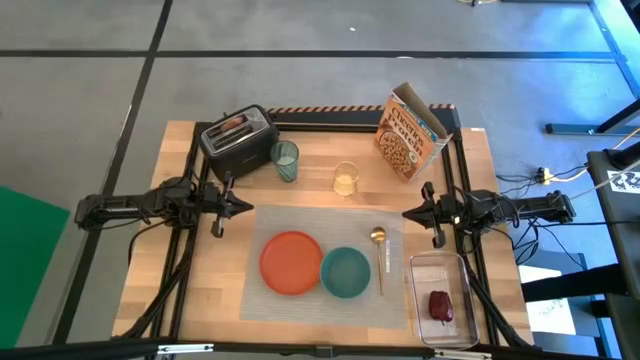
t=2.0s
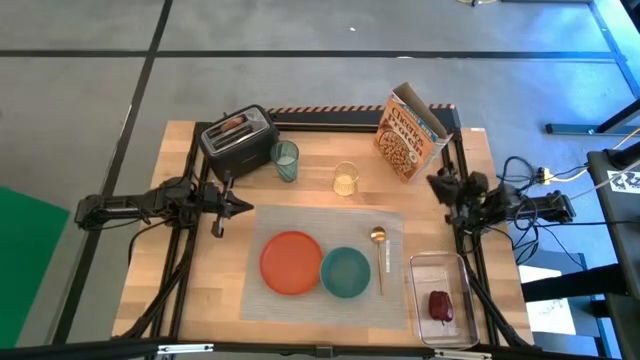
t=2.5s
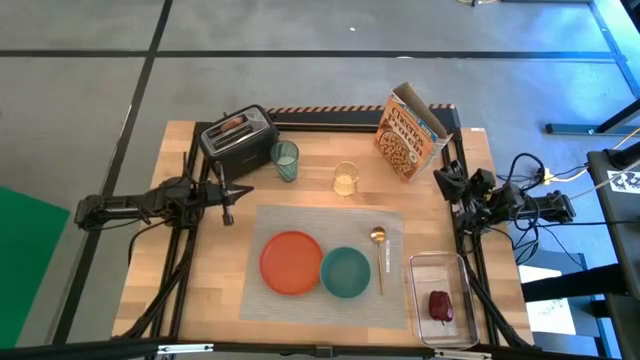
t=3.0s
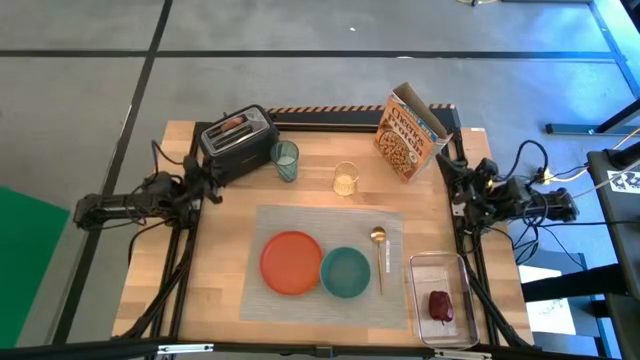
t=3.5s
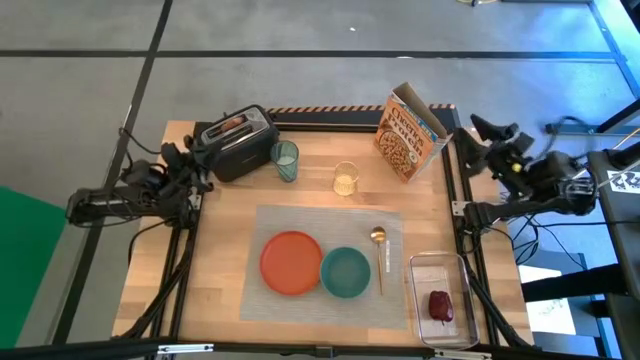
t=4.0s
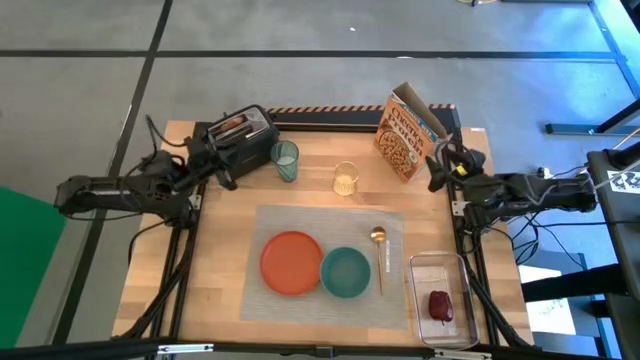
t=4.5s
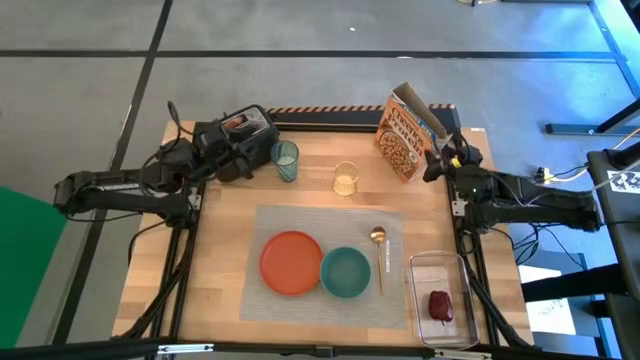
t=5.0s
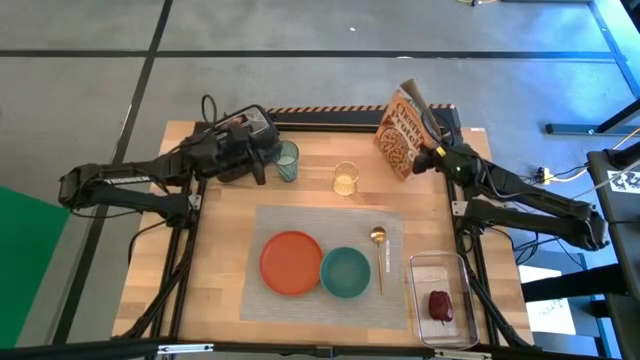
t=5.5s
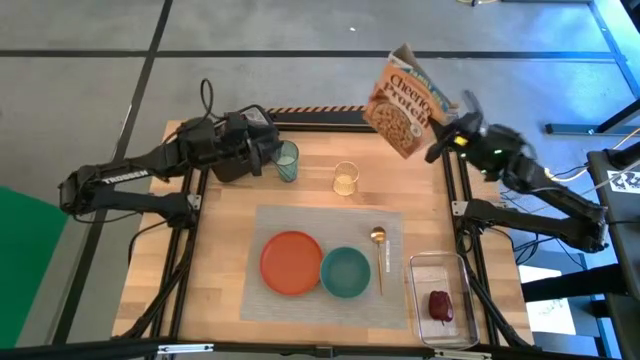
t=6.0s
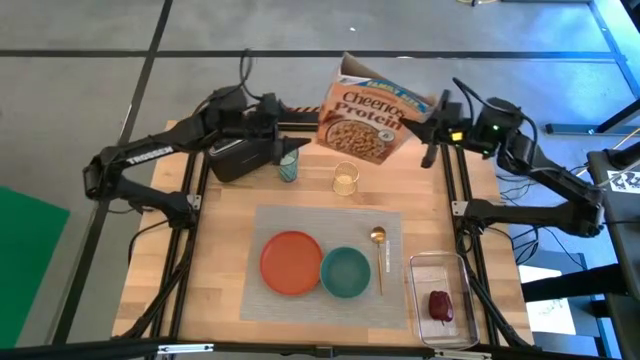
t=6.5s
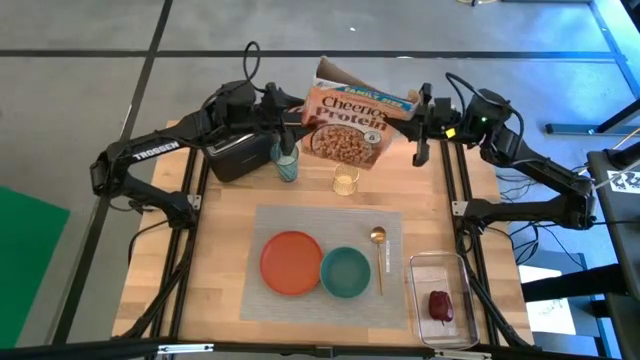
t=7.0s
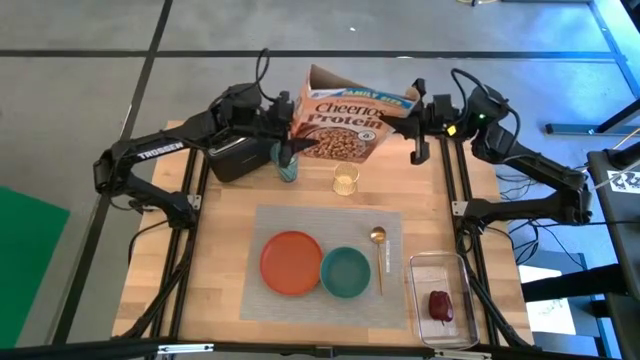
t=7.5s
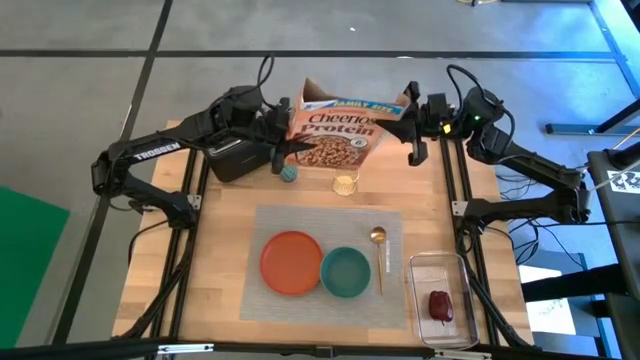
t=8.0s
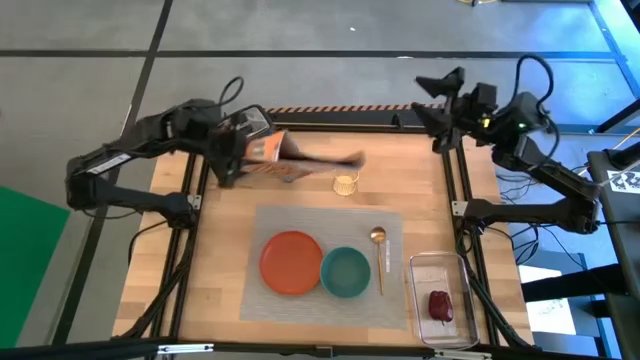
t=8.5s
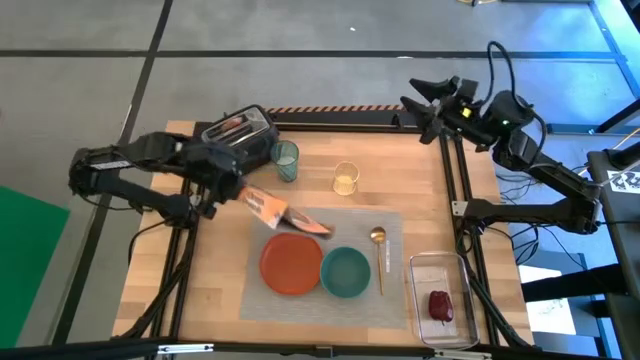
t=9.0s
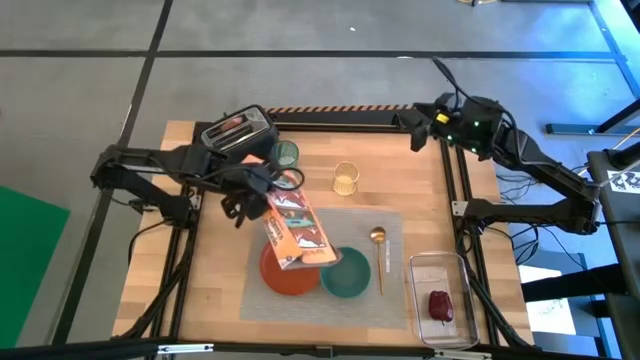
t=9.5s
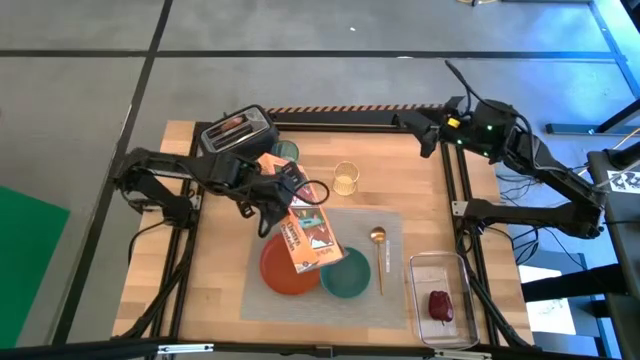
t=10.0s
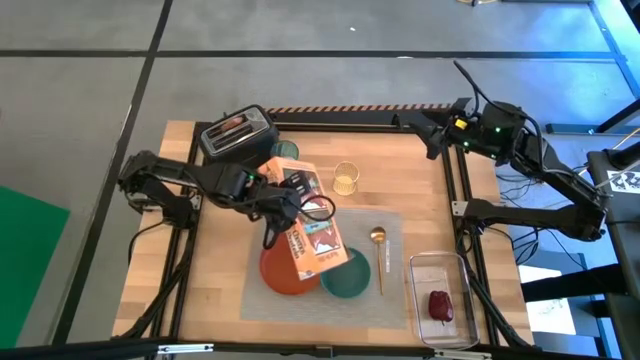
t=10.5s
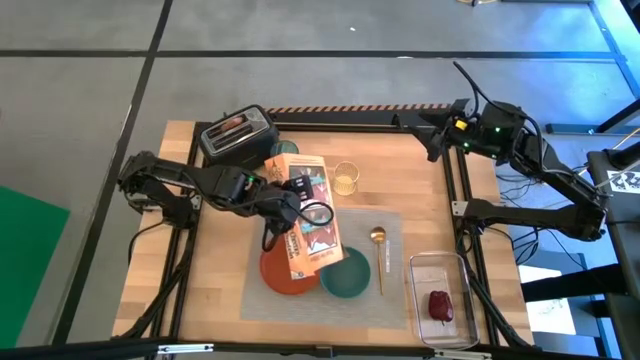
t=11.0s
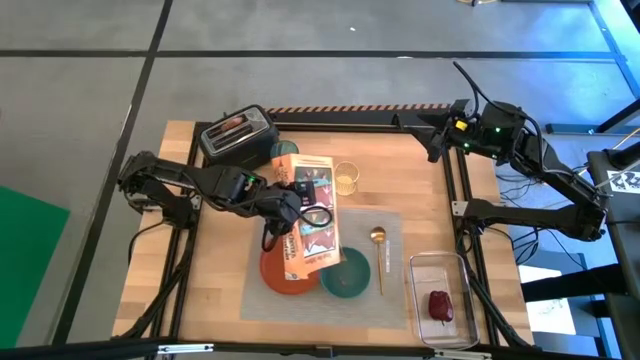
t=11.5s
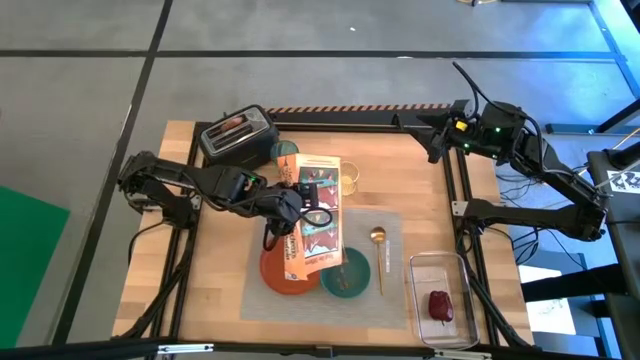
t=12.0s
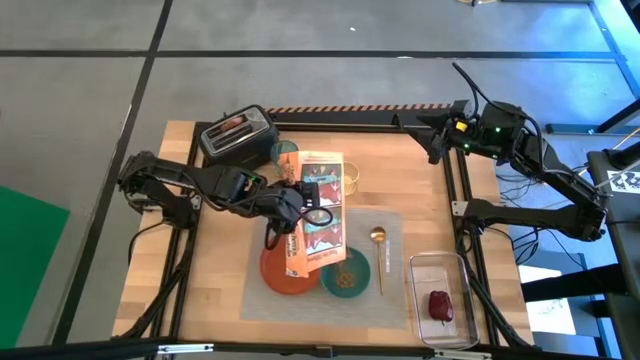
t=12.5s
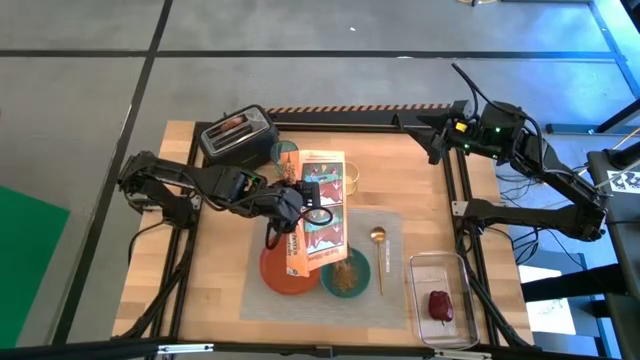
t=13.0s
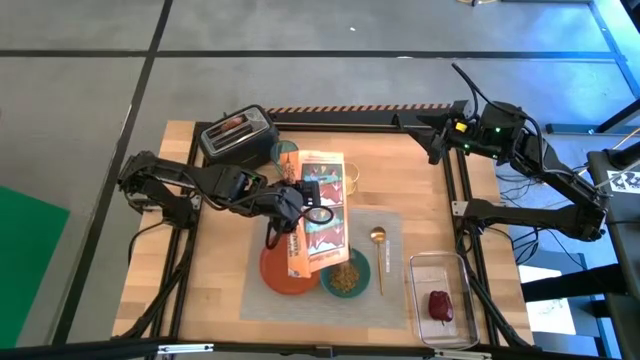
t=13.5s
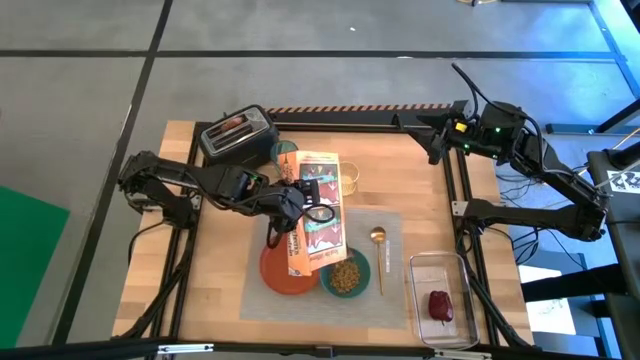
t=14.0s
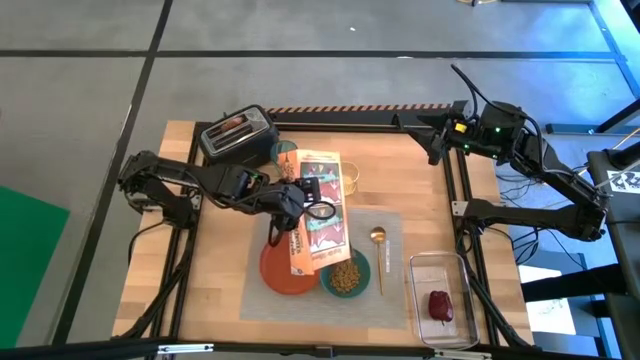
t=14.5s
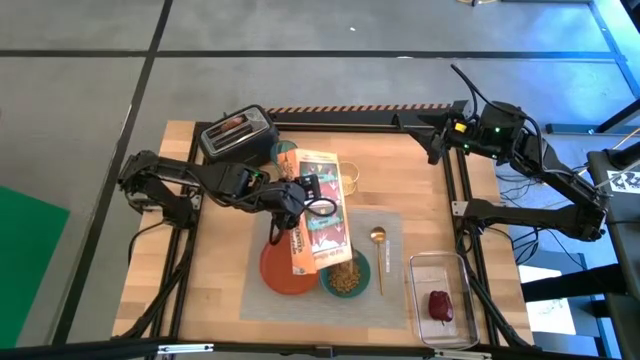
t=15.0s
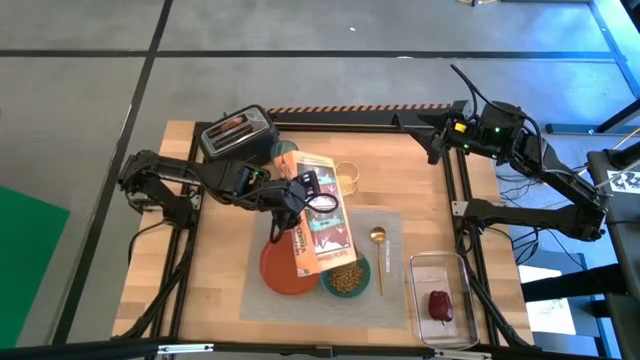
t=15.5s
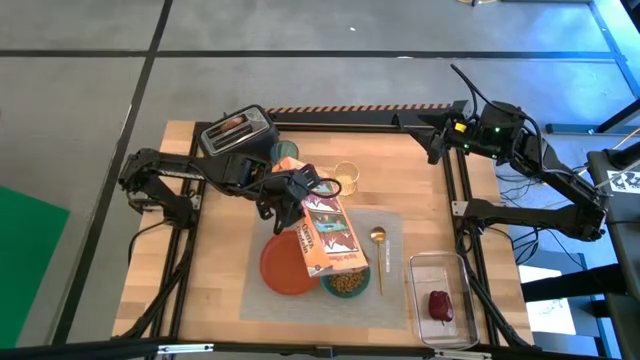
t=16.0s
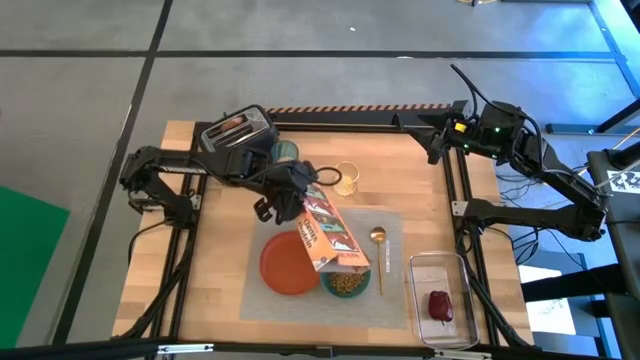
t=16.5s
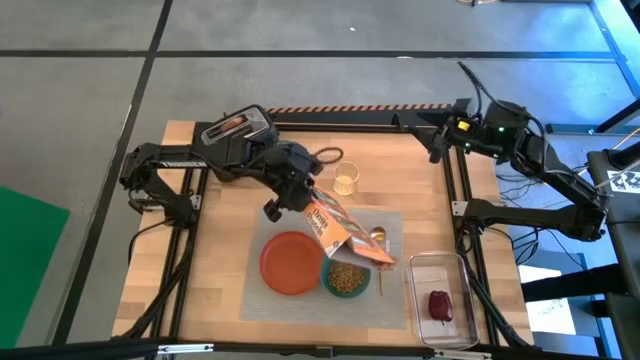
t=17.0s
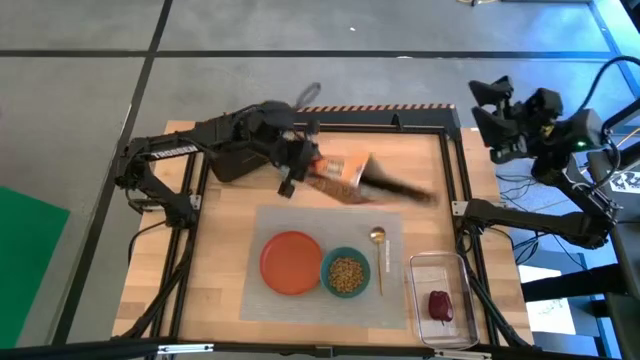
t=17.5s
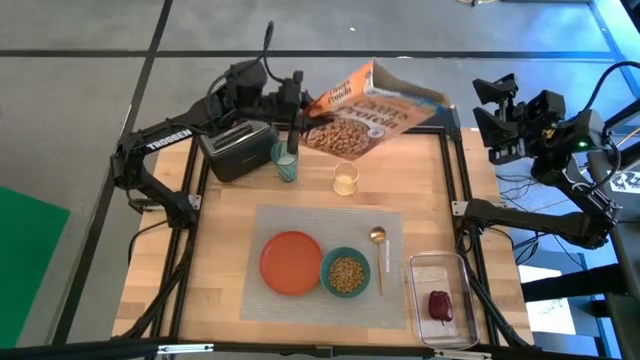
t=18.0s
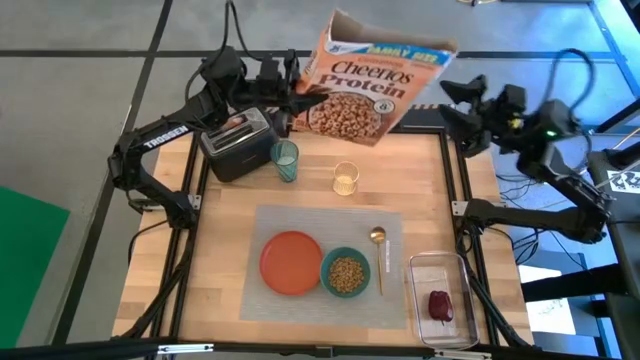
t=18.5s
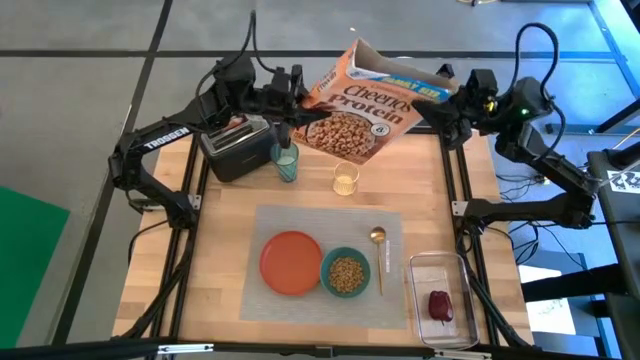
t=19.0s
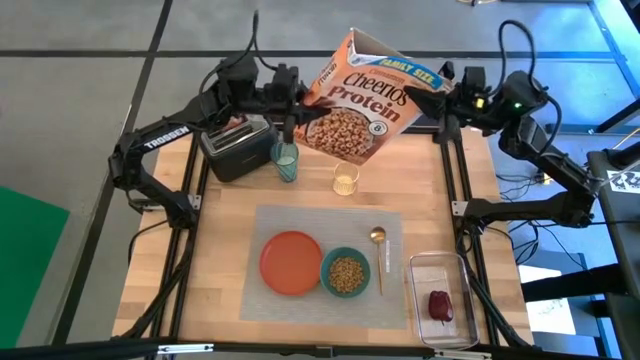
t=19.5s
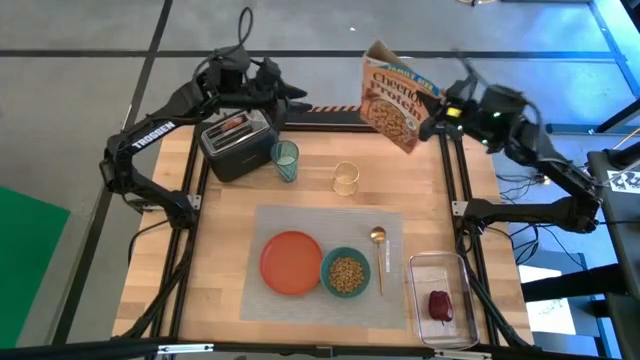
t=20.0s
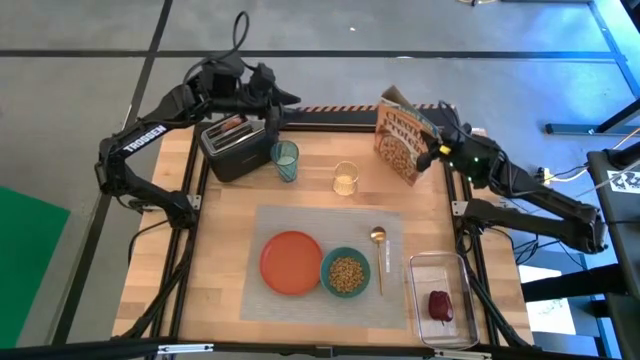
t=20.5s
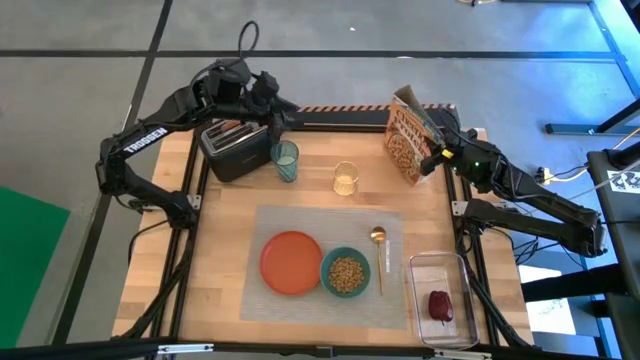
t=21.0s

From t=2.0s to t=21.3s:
Task: Arrange a breakfast setting
Pour the cereal into the green bowl
